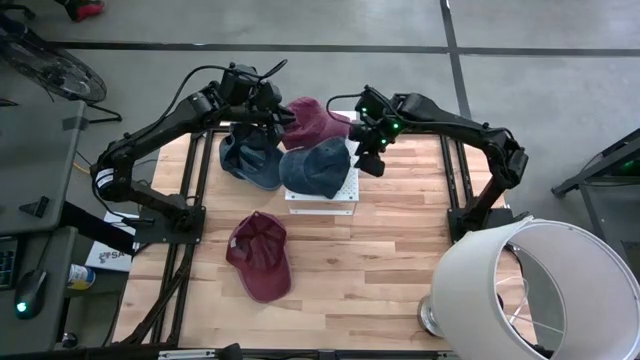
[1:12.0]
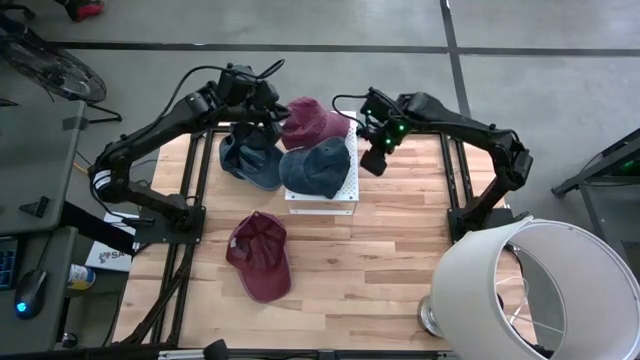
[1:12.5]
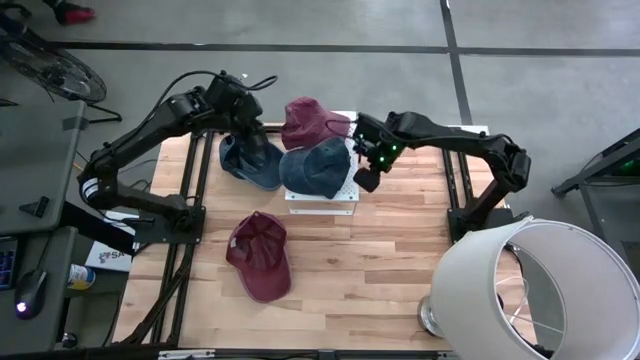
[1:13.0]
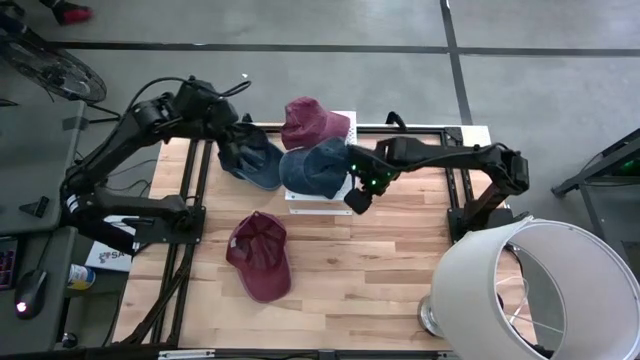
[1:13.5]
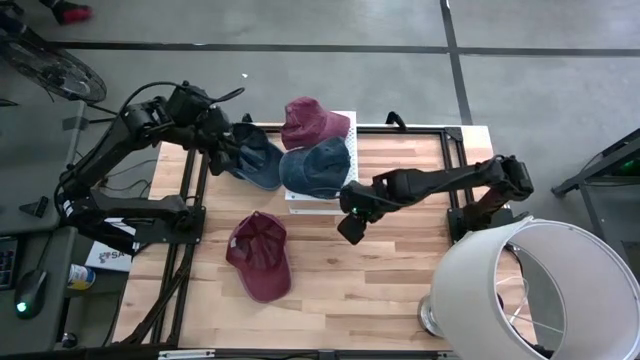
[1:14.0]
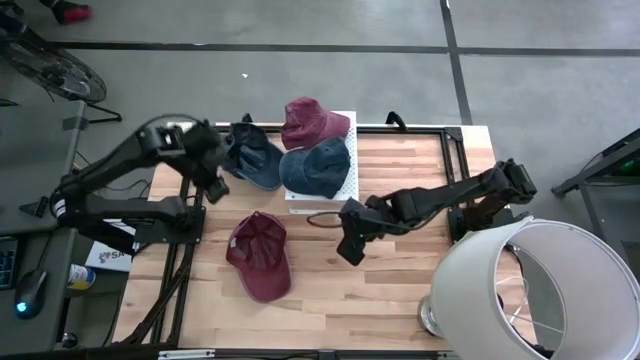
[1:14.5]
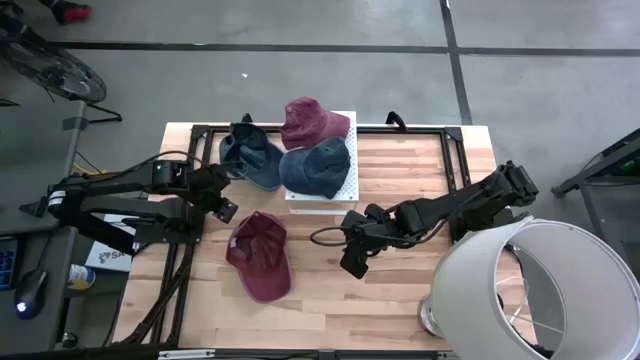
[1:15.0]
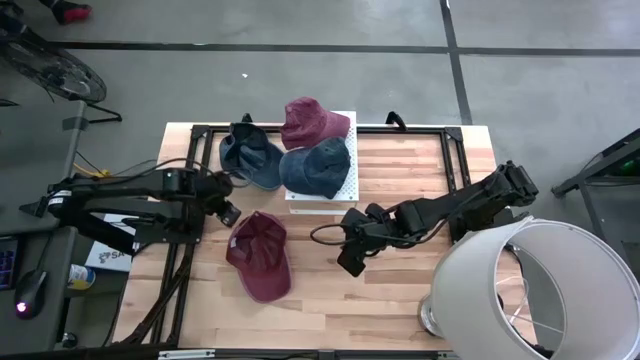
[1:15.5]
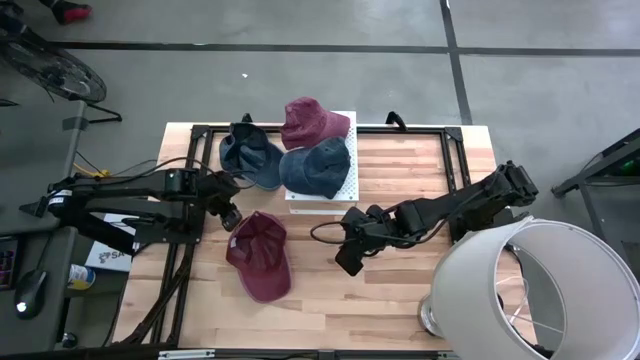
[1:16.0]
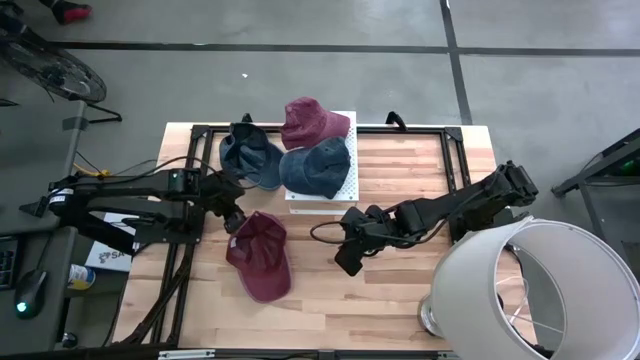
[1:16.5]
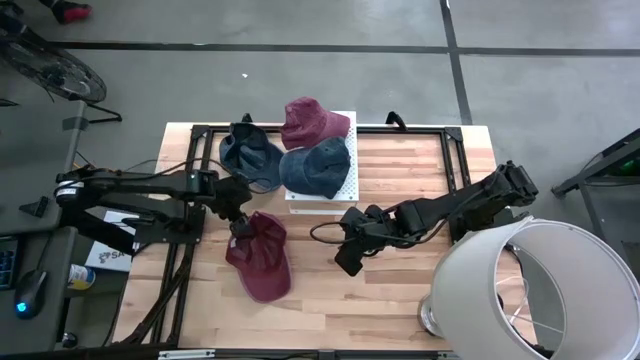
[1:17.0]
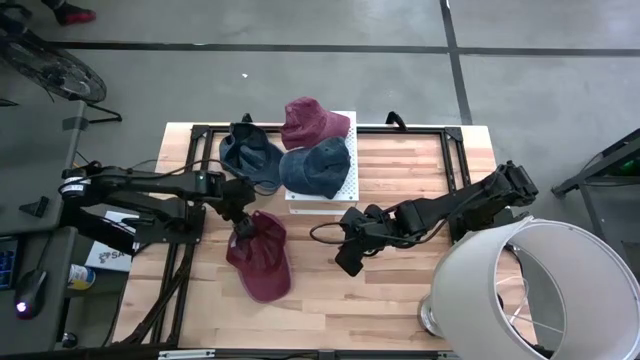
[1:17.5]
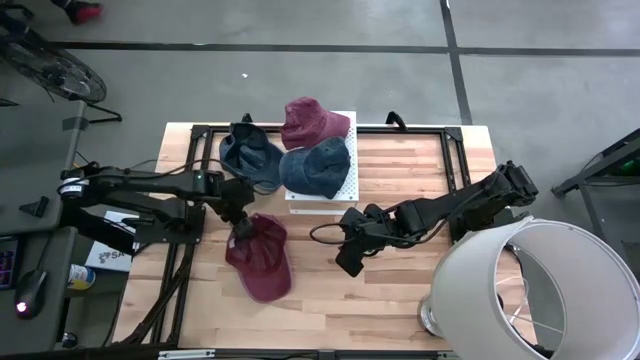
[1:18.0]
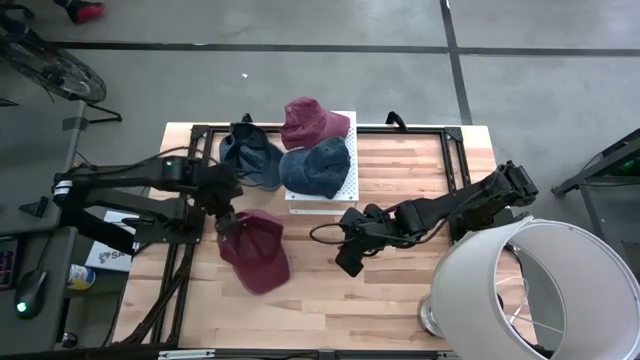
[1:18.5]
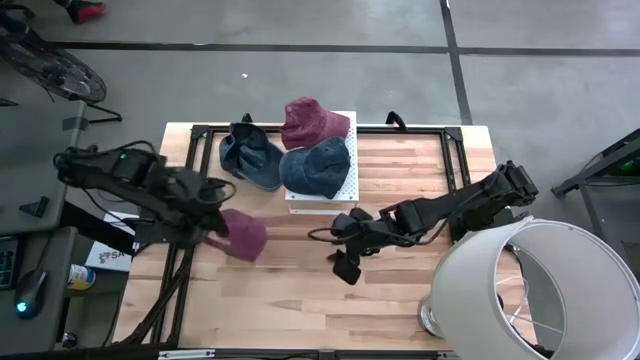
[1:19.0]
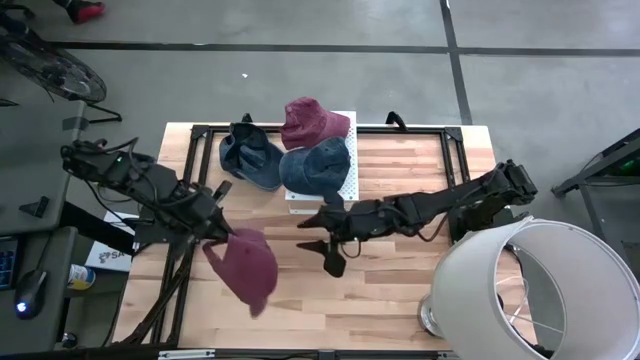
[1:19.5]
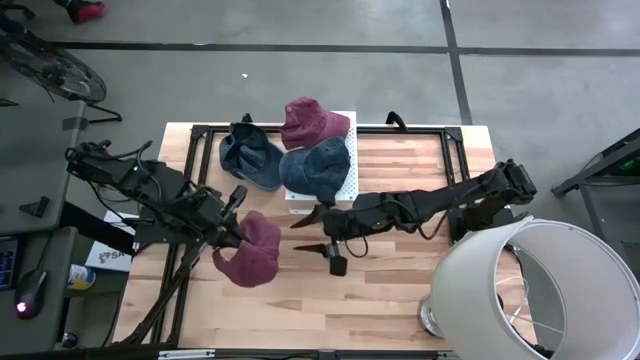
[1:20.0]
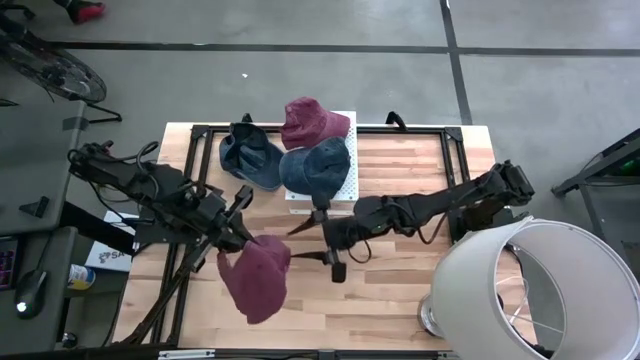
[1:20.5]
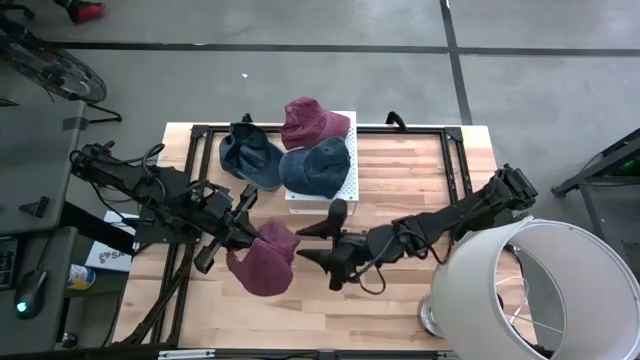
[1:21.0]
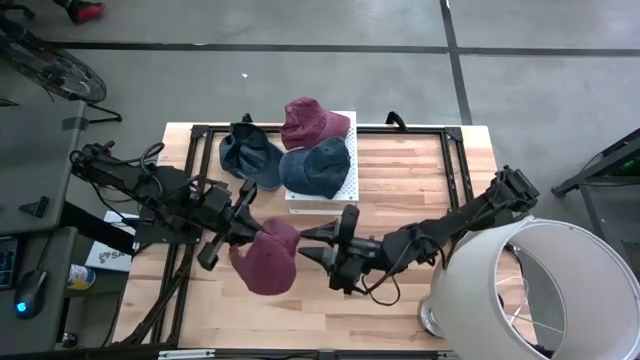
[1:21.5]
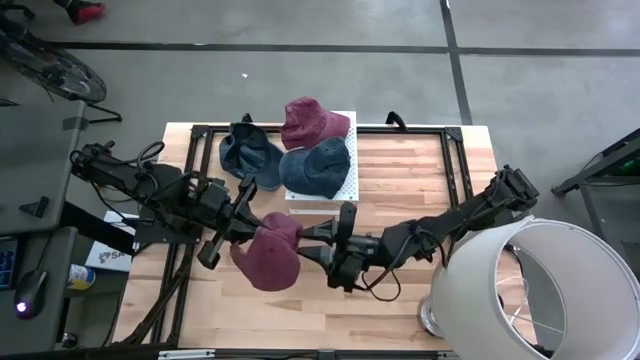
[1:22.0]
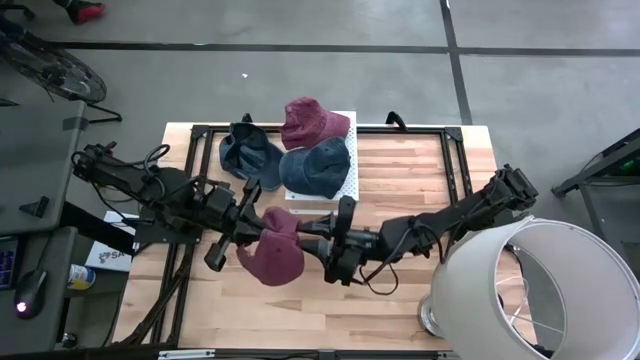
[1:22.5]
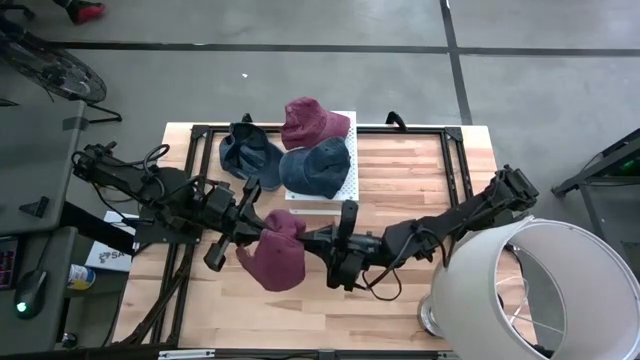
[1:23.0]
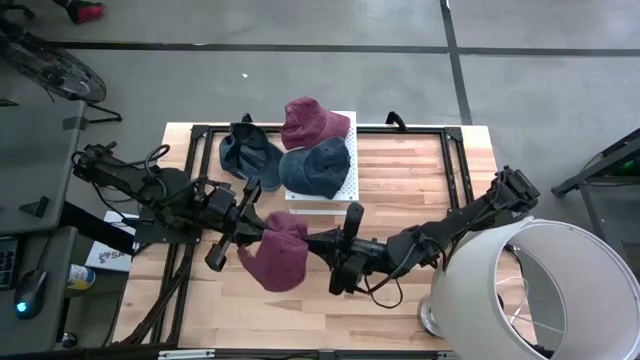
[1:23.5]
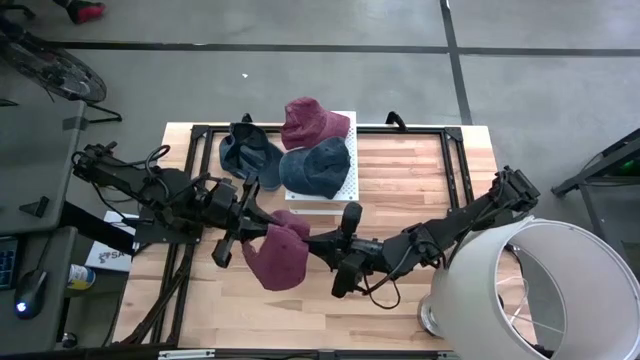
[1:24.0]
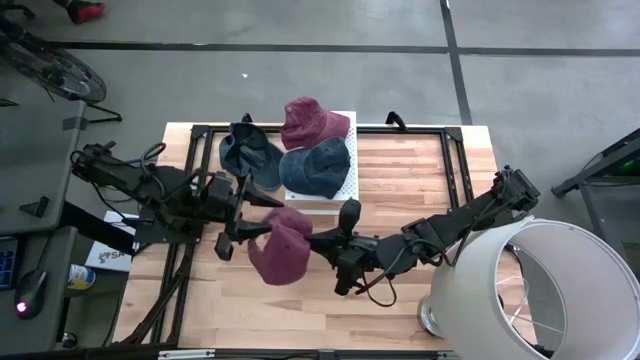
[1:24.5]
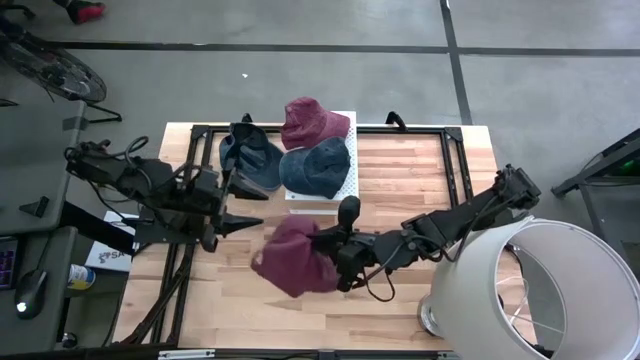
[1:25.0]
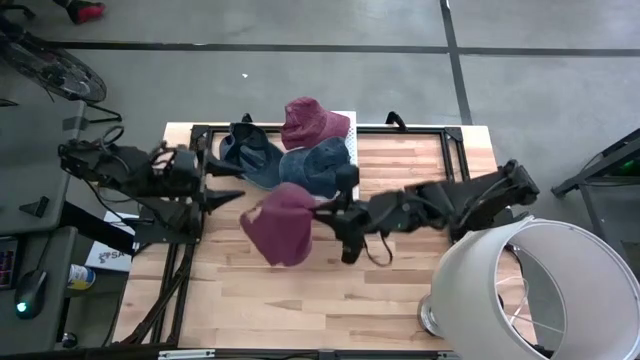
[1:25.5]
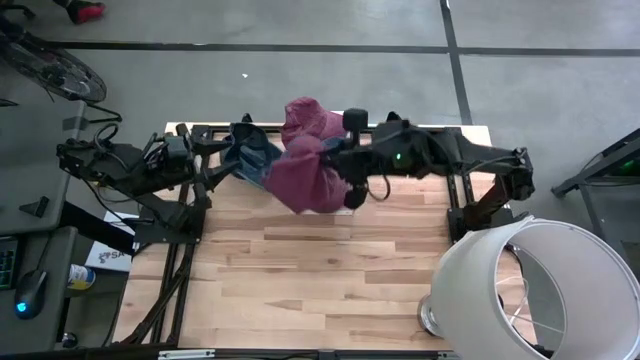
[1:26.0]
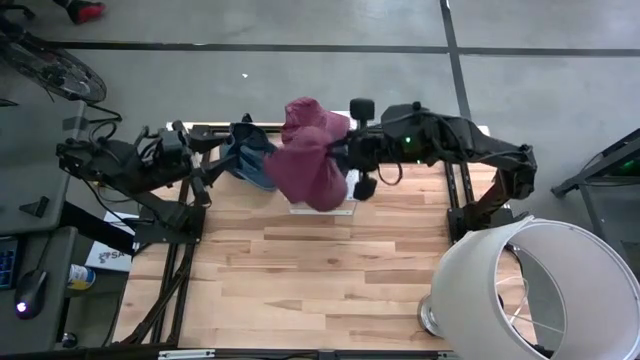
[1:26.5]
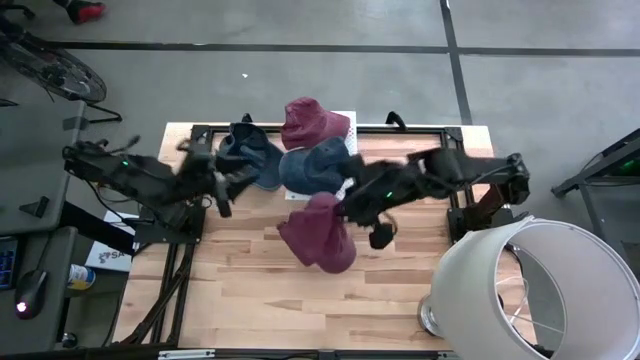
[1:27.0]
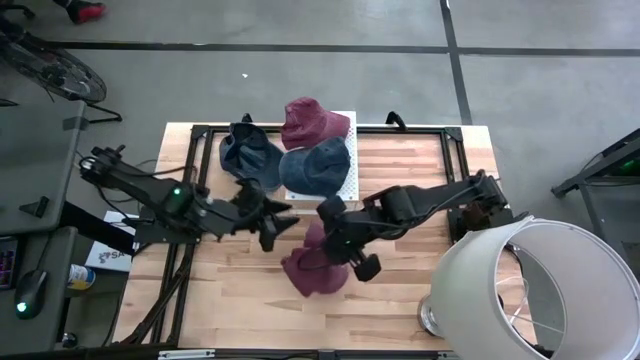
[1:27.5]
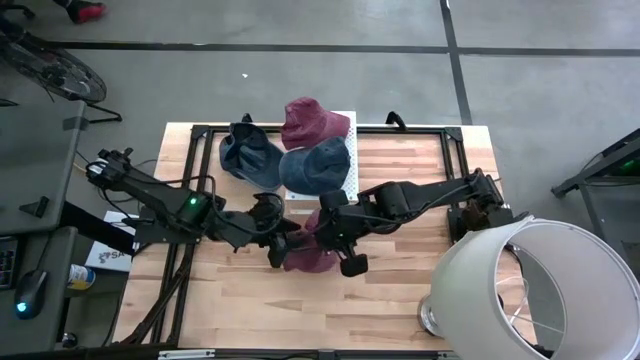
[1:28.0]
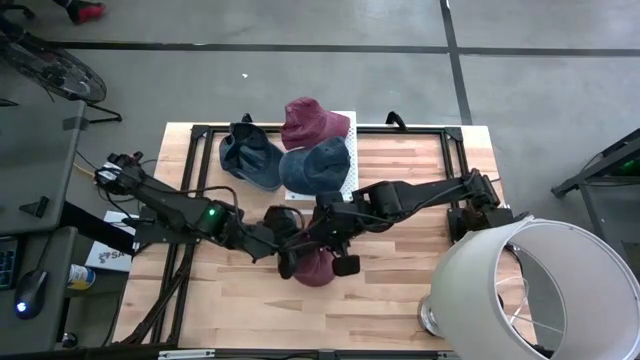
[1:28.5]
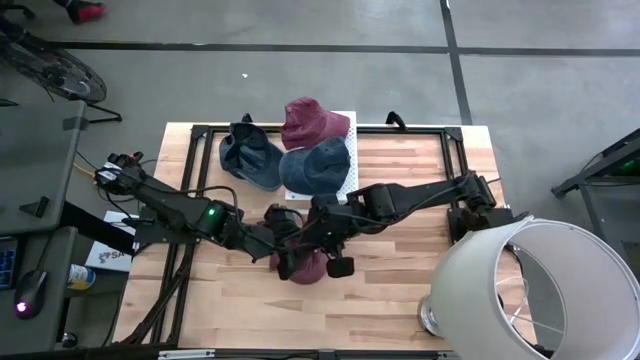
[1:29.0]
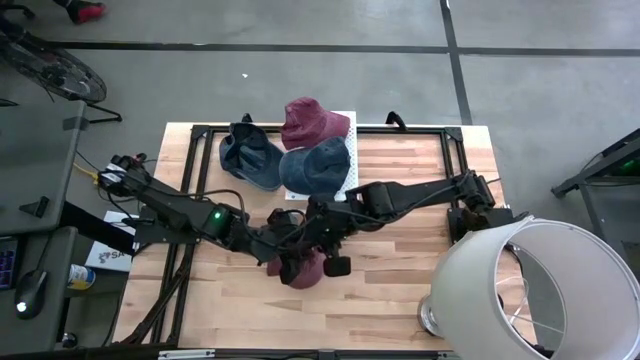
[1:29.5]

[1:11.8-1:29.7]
Task: Pick & Place hat
Stack the red cap on top of the other red cap on the shelf
